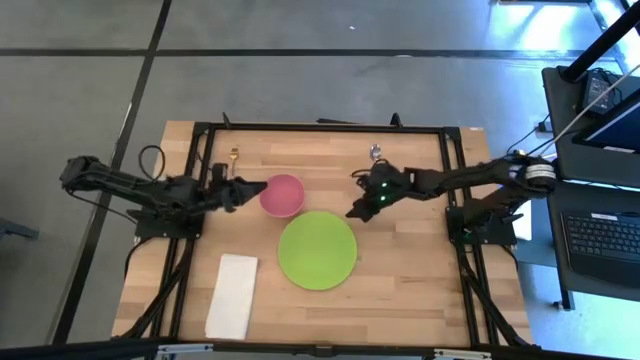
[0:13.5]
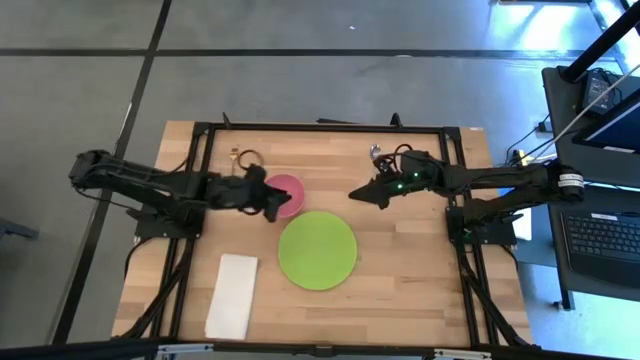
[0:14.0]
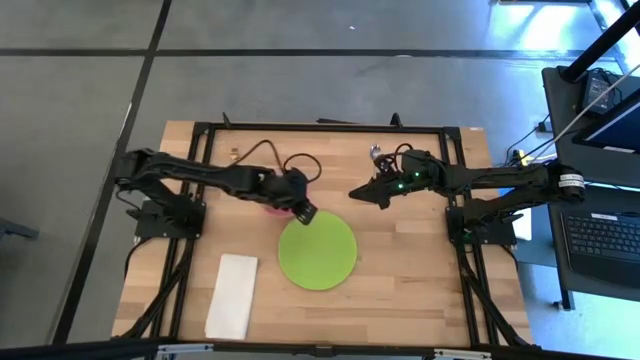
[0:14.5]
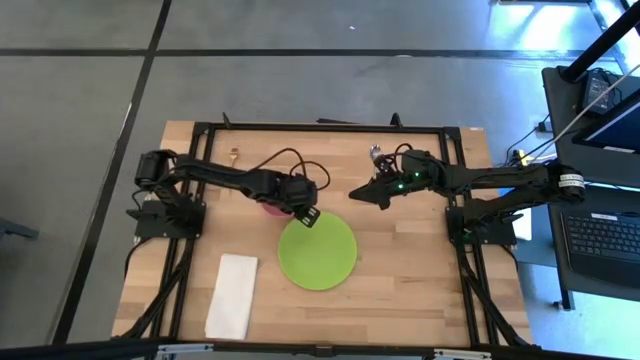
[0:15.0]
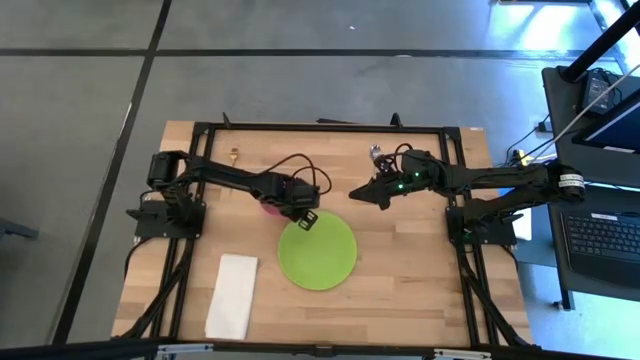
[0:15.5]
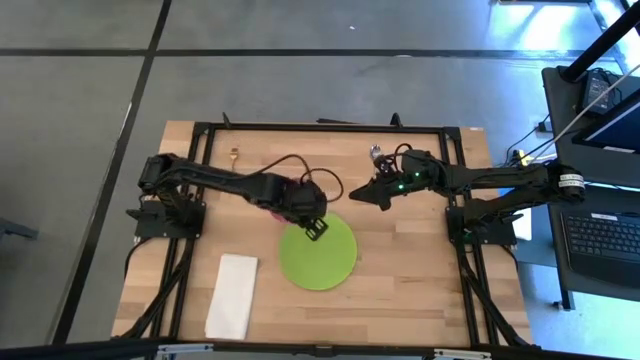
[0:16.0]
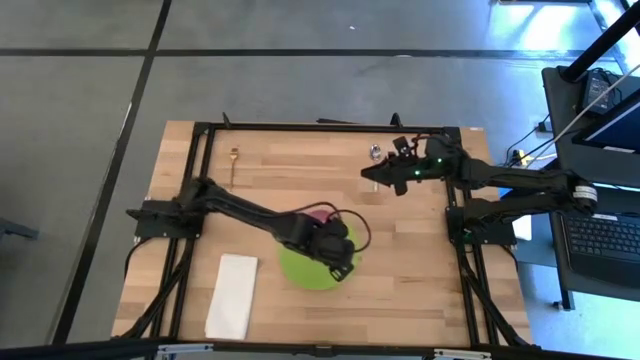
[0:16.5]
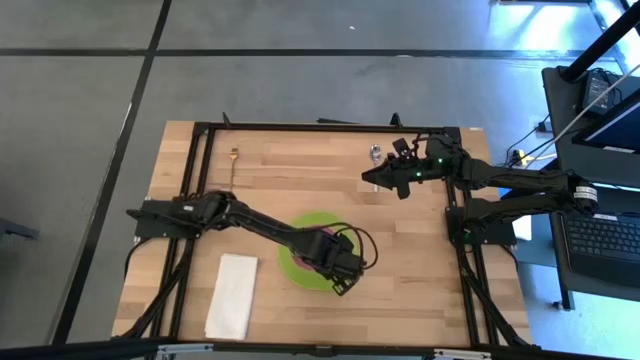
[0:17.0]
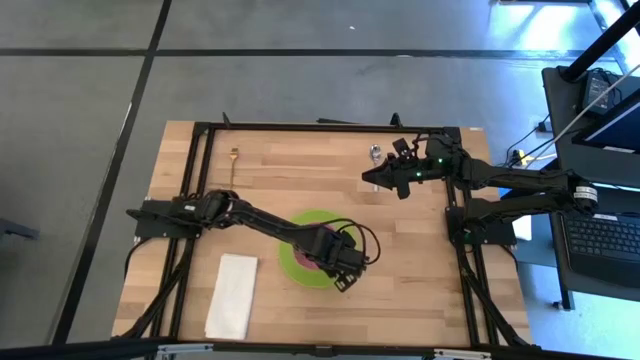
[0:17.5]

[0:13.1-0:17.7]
Task: Set table place
Put the pink bowl on top of the green plate

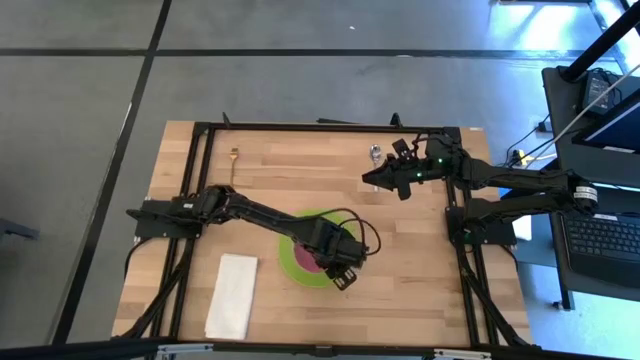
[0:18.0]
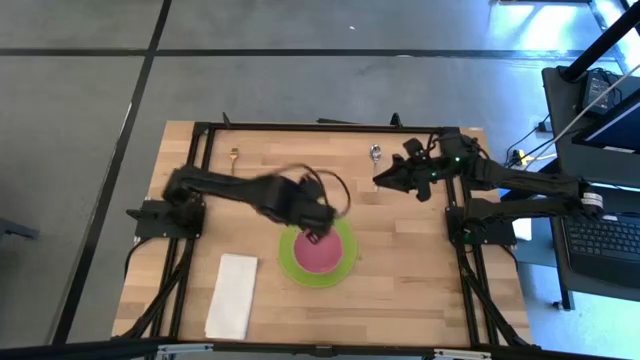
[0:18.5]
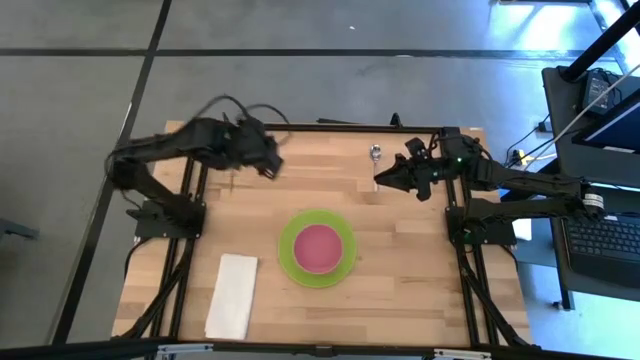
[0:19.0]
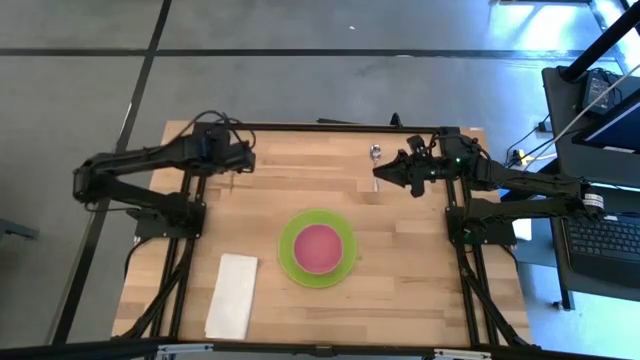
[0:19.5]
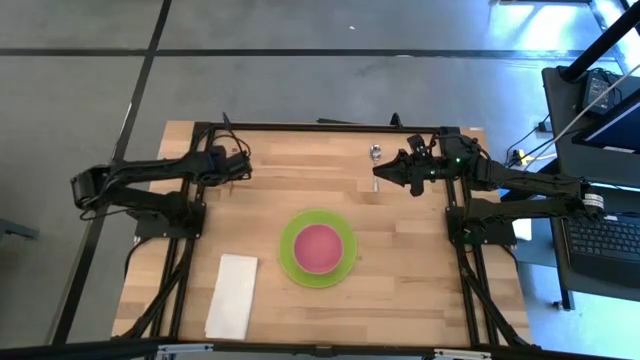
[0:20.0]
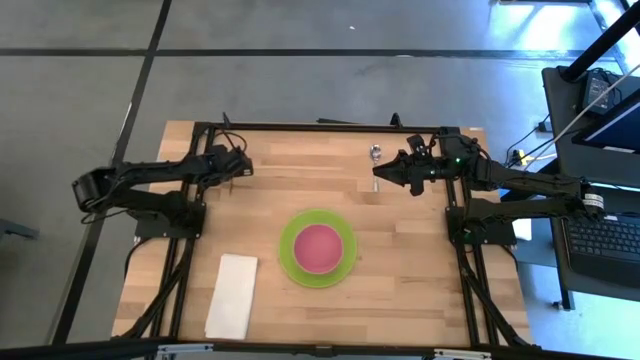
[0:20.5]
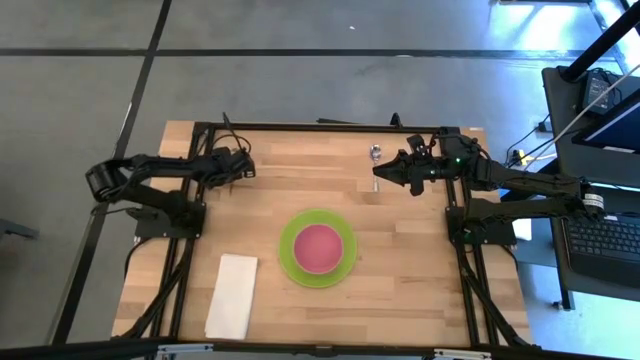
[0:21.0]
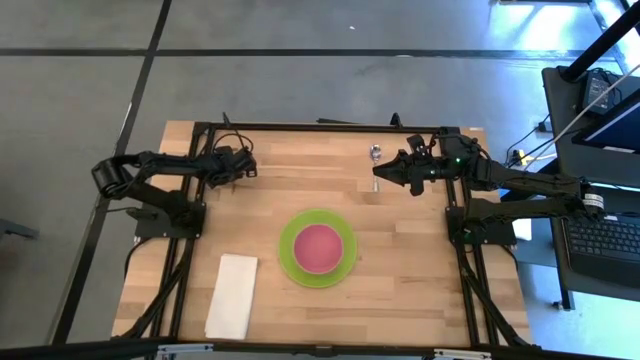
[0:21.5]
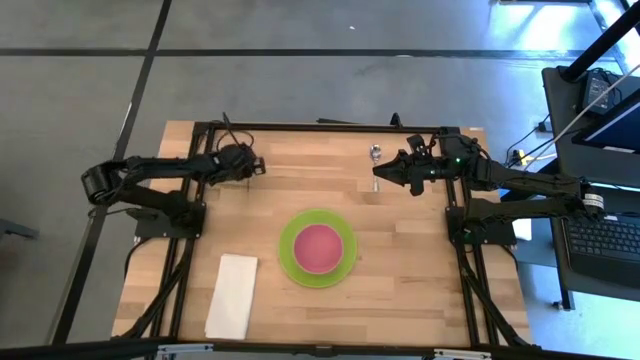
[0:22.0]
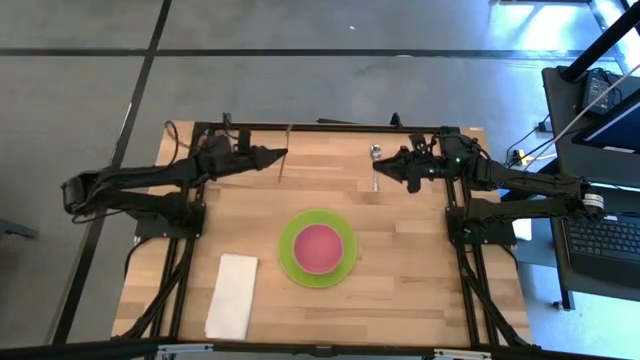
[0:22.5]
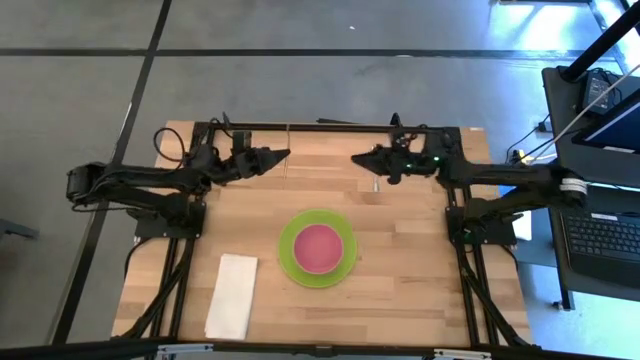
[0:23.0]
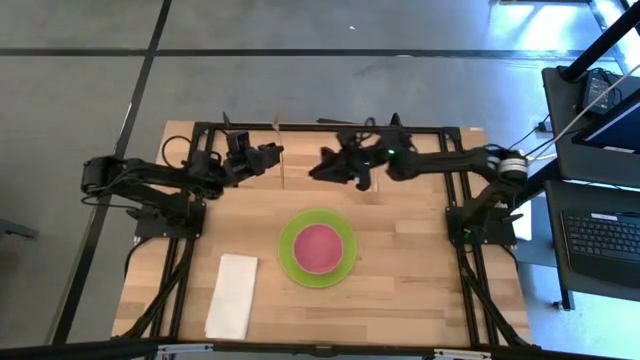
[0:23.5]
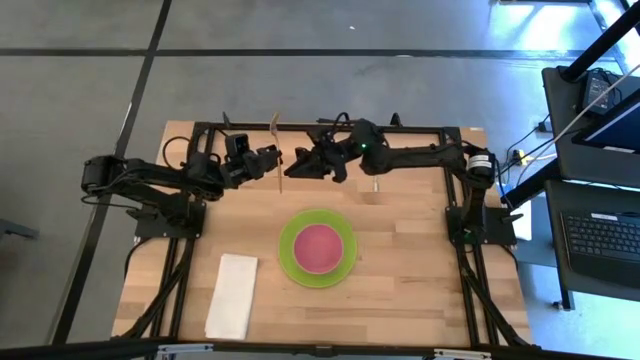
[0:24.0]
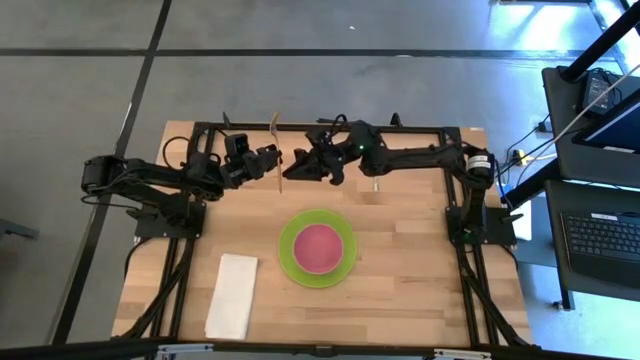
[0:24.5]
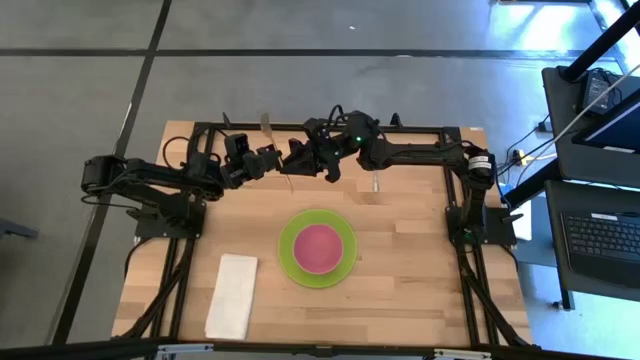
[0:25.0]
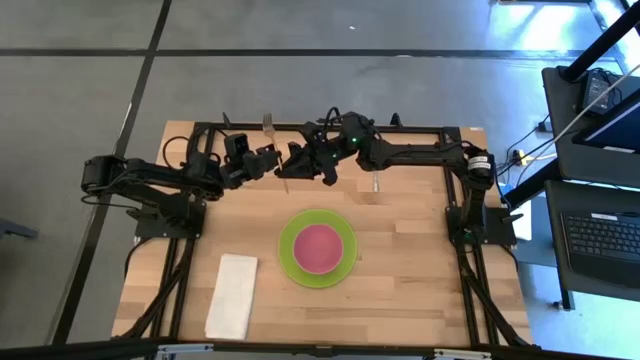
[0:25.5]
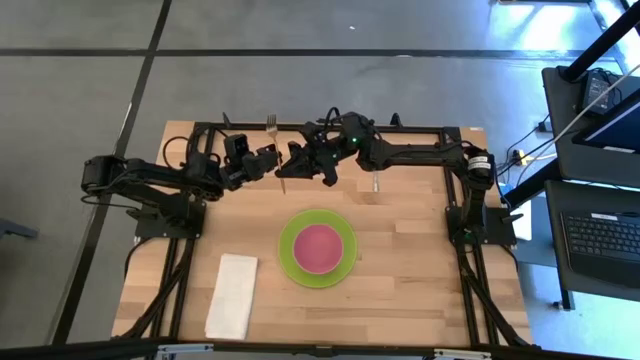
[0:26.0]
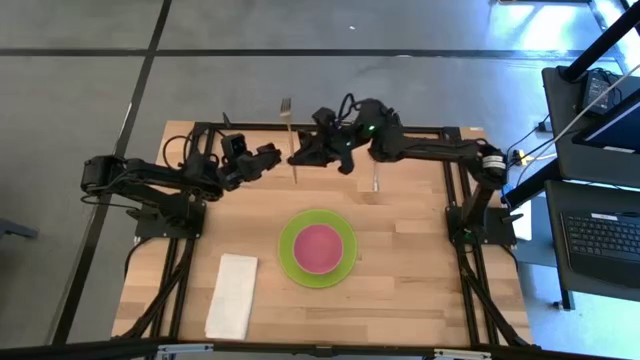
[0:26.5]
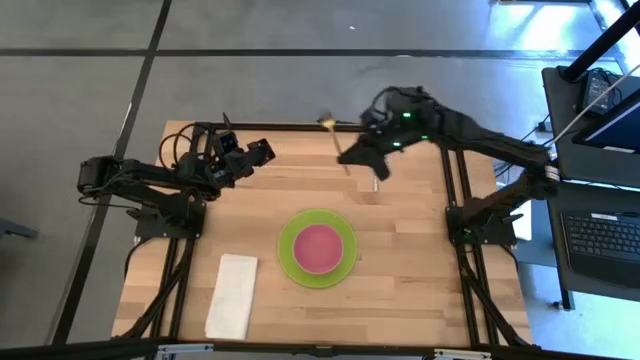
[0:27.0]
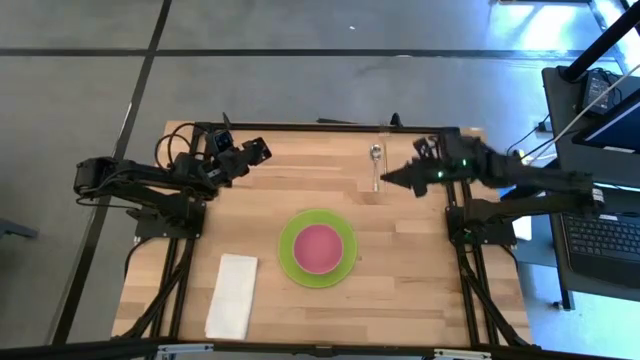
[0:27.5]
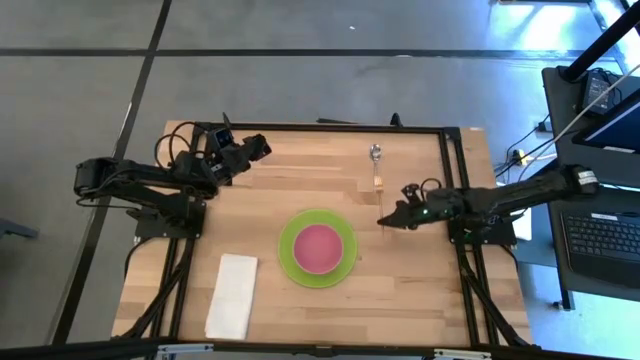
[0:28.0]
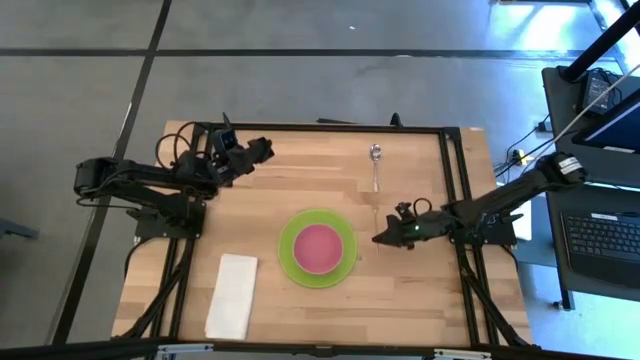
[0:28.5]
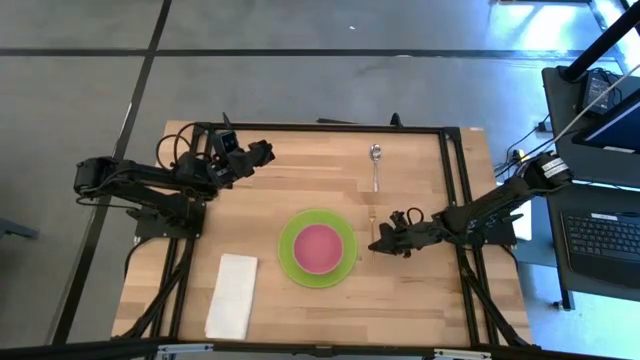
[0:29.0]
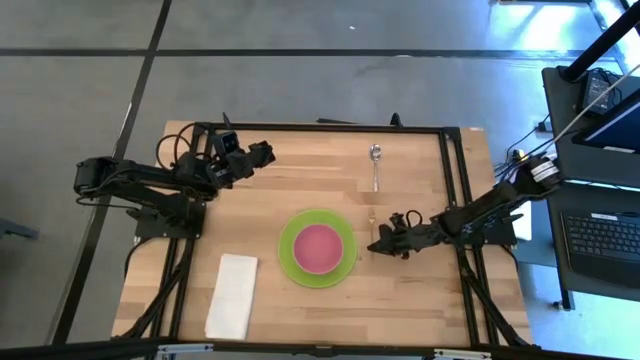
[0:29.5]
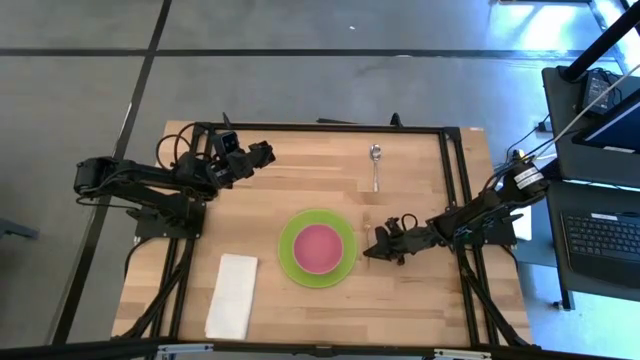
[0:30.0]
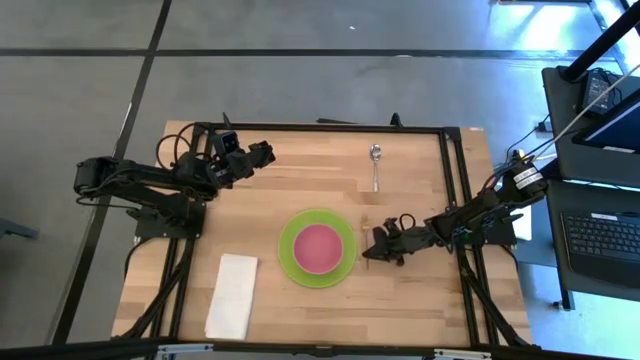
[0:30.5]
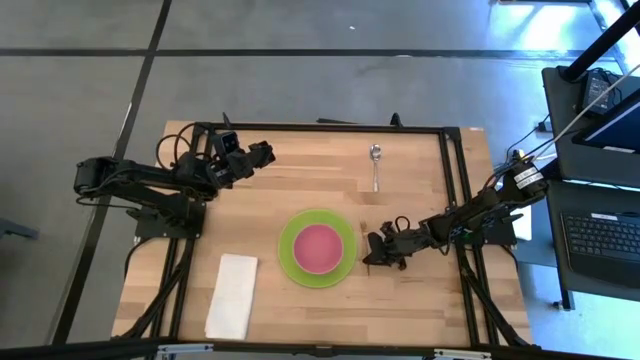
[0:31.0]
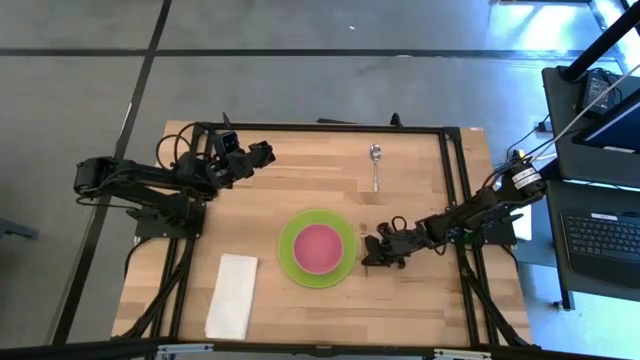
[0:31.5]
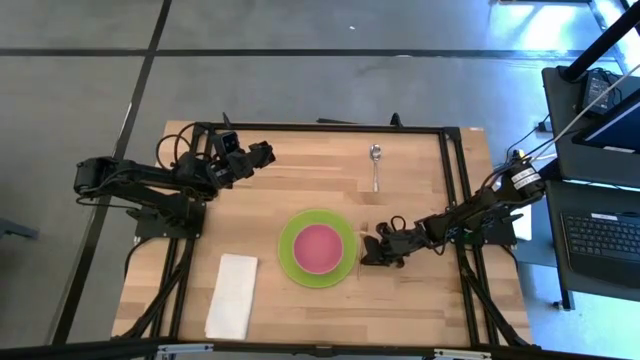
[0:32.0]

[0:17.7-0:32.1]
Put the gold fork to the right side of the green plate

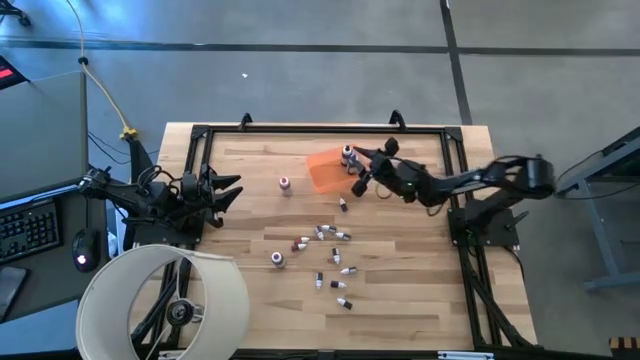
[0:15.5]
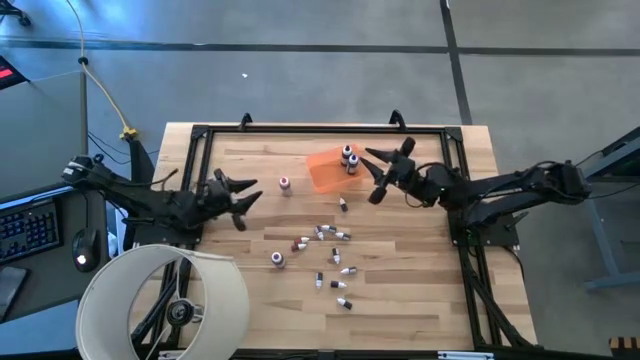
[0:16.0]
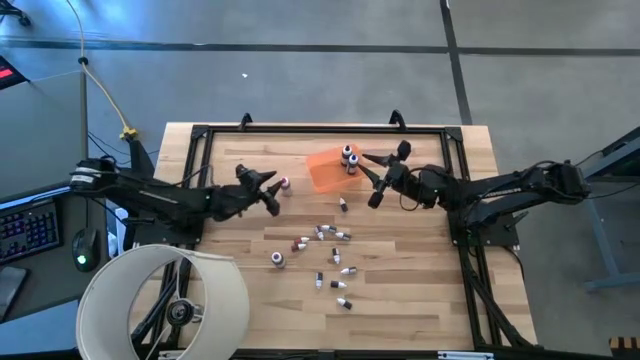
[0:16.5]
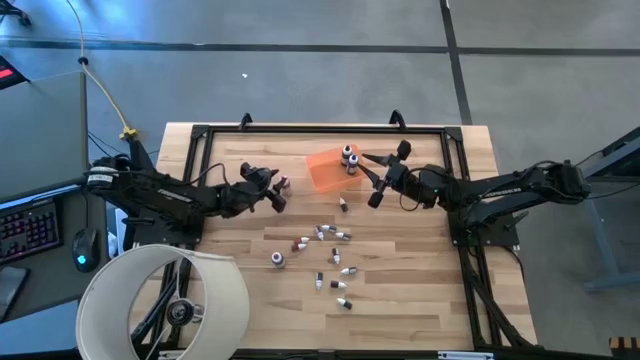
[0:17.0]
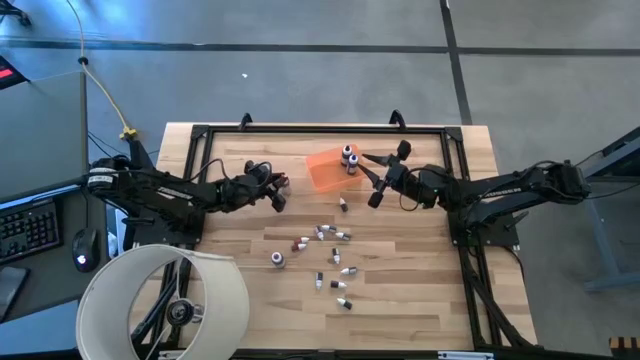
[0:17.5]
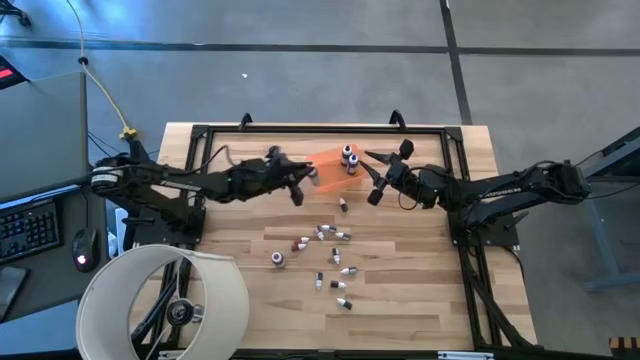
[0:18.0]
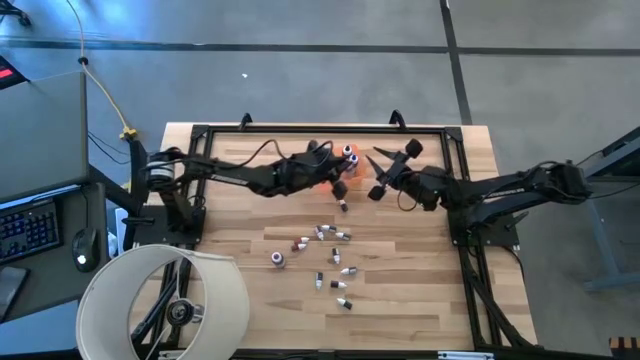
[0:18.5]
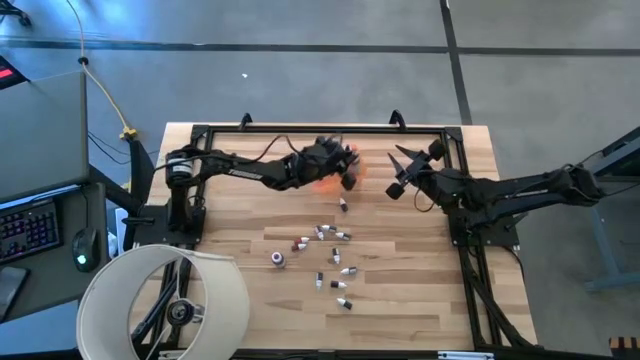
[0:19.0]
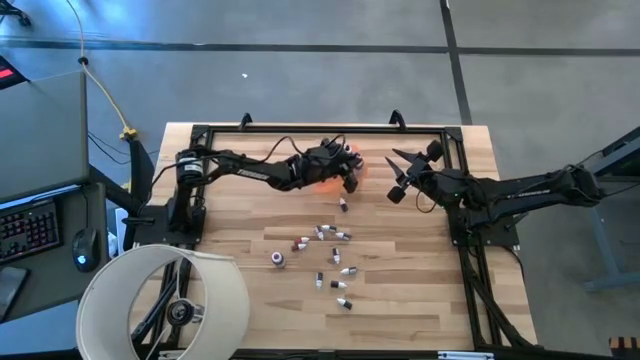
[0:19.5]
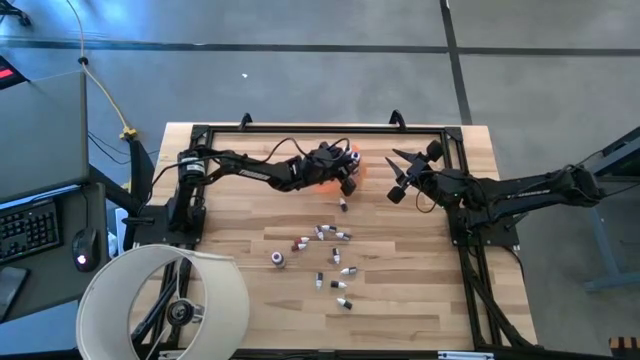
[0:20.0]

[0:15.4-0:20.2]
Task: Pick & Place food coloring
Put the big pink food coloring bottle into the orange bin
